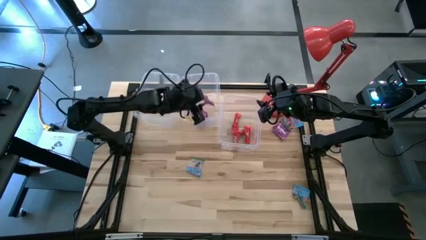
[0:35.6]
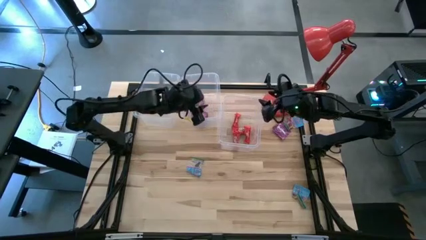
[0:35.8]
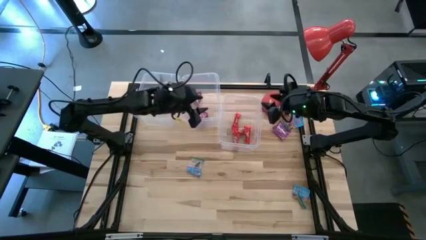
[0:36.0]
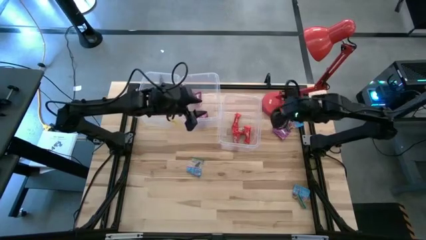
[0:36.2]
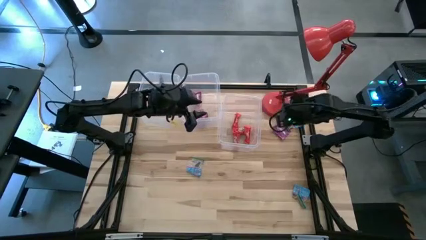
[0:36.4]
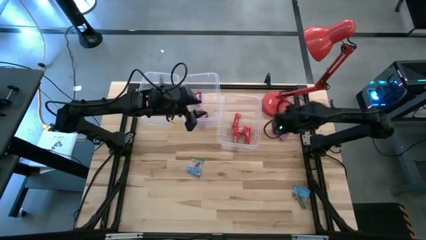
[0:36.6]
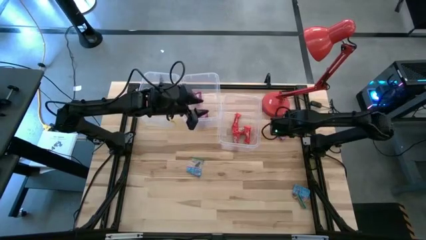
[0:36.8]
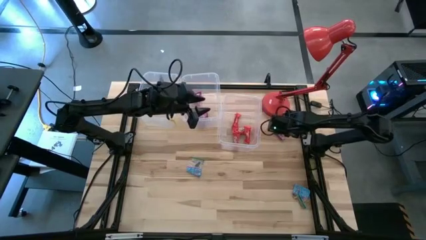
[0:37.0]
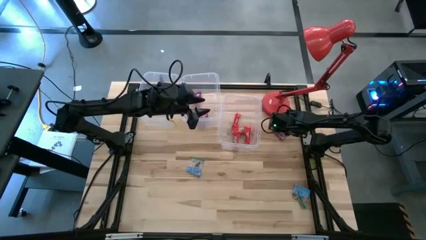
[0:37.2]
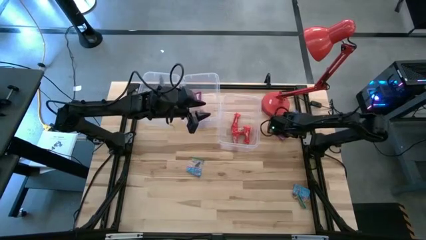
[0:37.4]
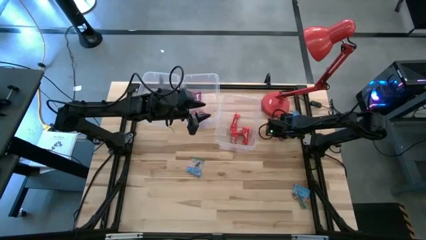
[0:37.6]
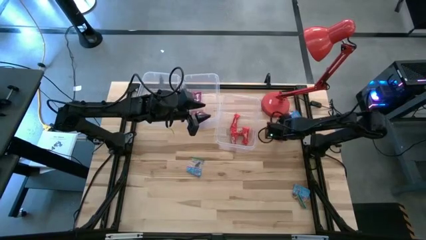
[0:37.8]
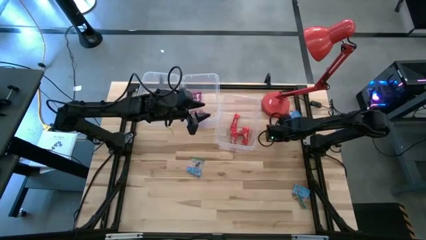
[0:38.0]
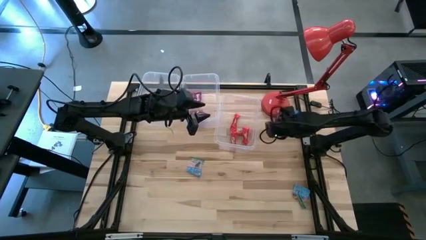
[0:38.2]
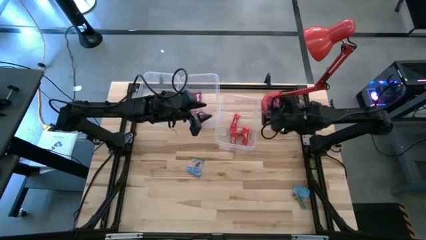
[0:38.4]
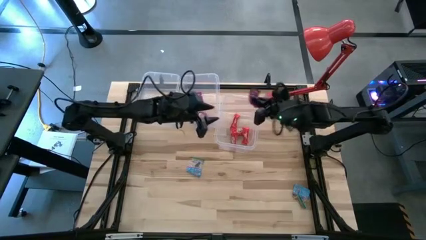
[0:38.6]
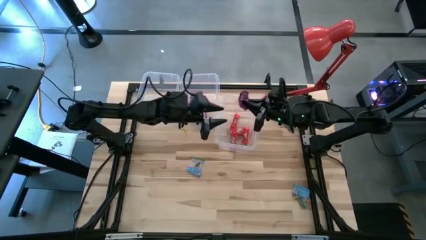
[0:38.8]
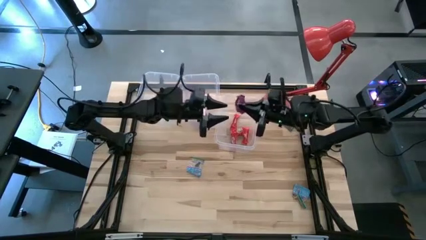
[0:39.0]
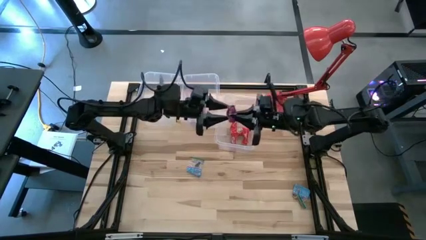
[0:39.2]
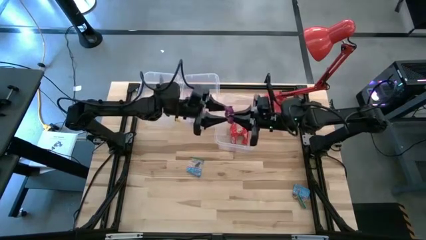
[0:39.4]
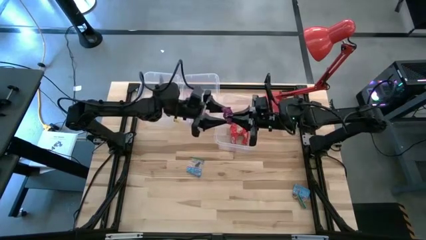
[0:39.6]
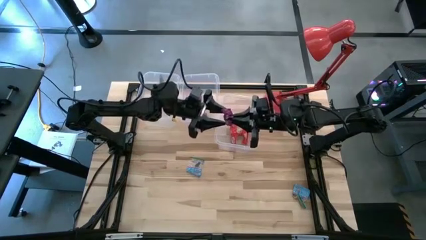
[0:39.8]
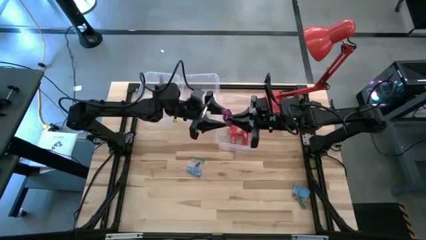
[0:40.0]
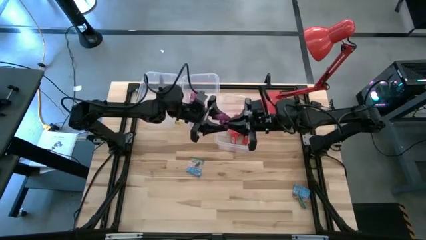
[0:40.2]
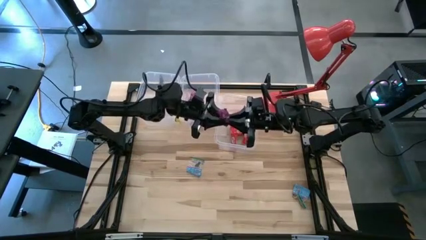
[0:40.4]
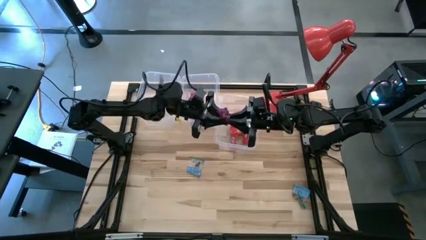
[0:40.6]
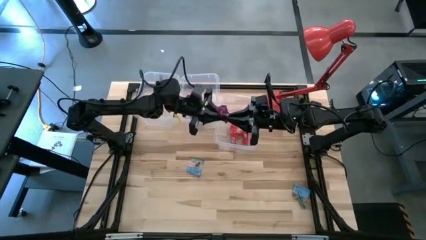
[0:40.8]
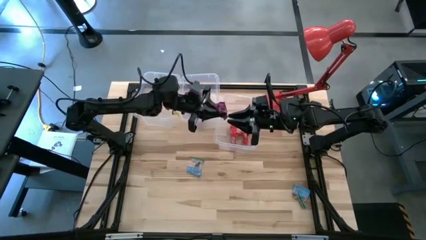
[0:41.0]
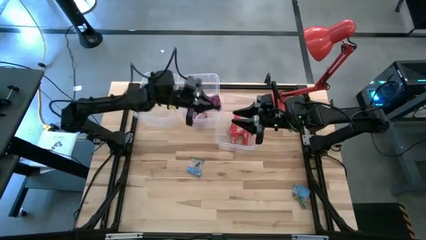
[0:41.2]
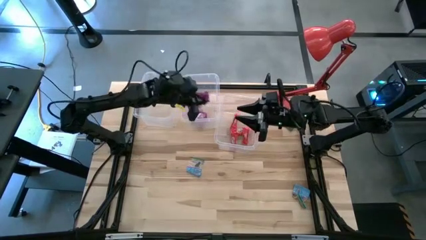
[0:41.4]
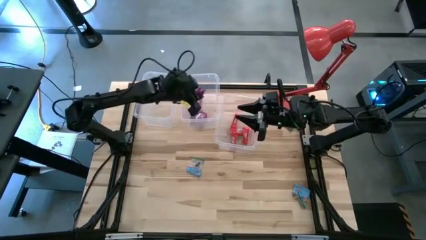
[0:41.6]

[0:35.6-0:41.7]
Task: Sort candy
Put the violet candy into the top center transparent bin

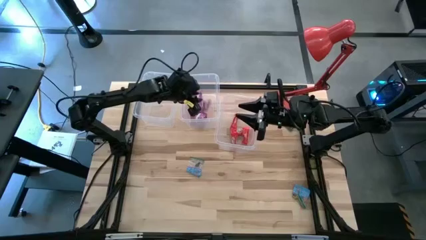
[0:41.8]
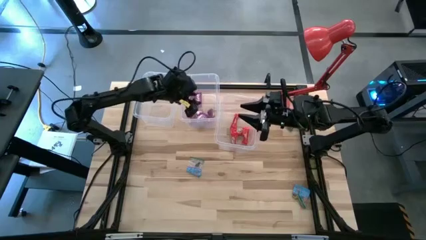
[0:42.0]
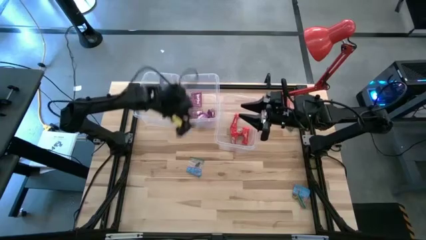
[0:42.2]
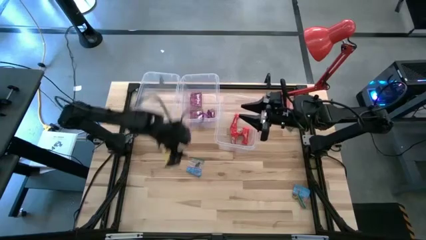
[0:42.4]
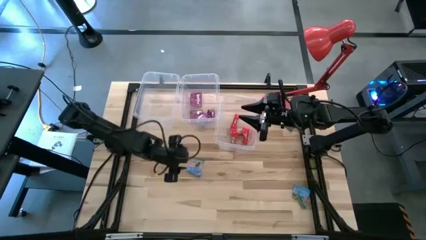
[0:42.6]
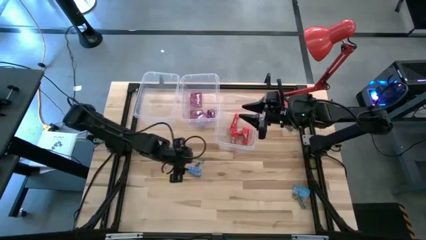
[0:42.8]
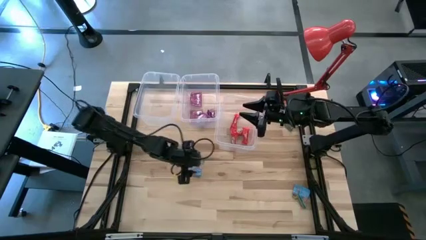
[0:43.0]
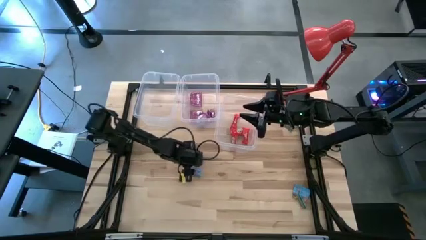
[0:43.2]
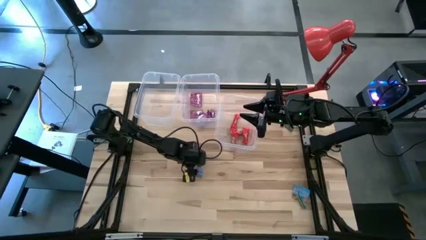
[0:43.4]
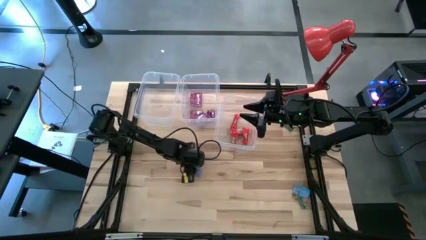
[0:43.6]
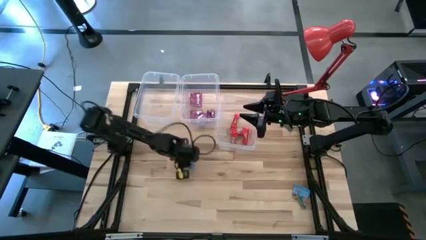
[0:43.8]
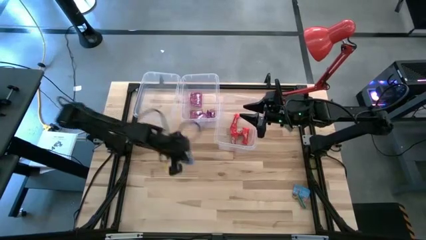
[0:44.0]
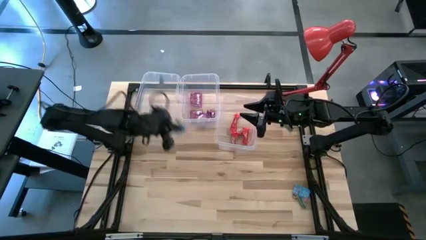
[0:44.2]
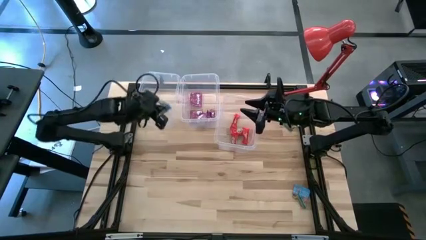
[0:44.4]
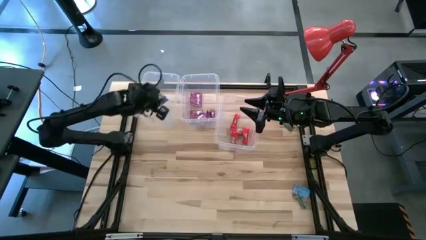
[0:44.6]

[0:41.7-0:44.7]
Put the middle left blue candy into the top left transparent bin

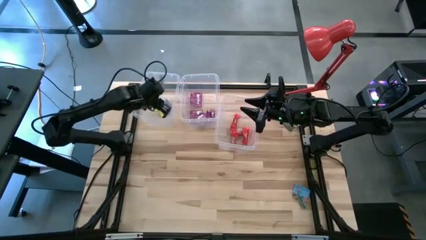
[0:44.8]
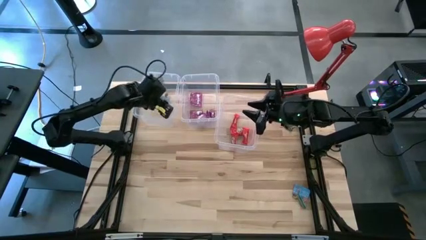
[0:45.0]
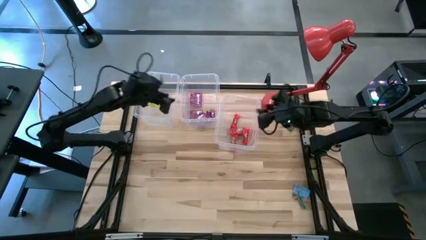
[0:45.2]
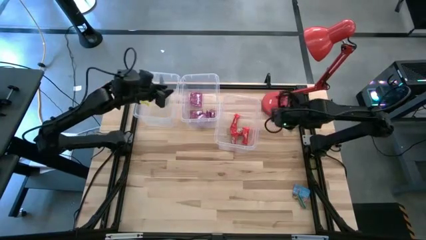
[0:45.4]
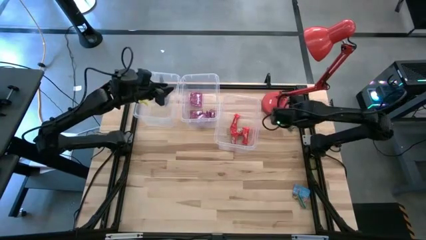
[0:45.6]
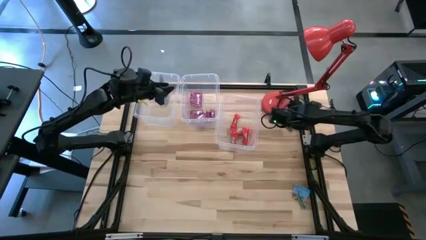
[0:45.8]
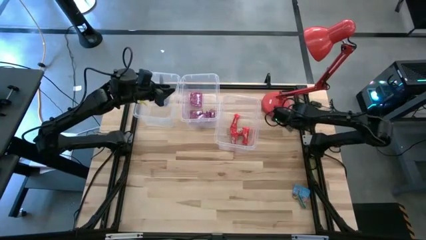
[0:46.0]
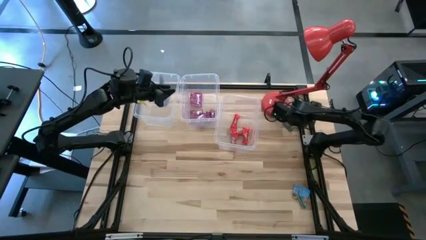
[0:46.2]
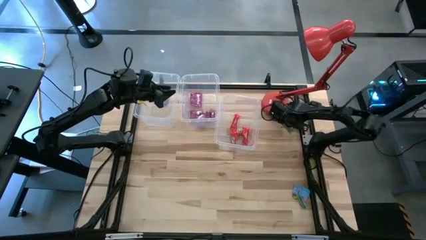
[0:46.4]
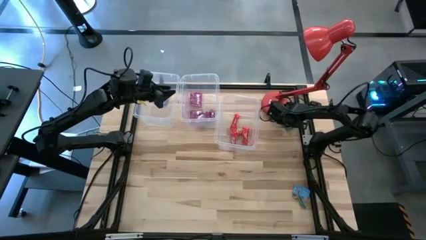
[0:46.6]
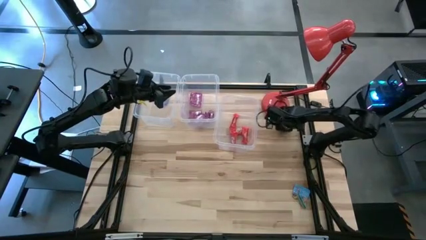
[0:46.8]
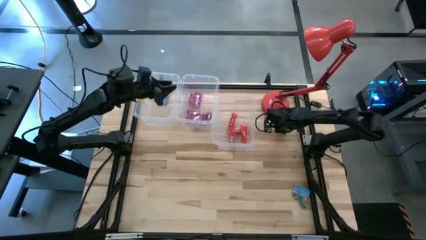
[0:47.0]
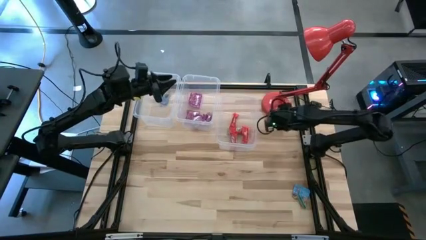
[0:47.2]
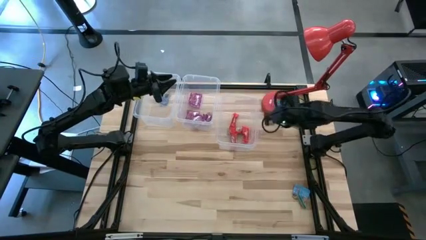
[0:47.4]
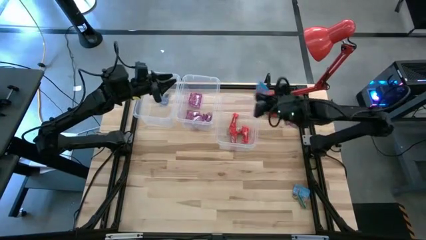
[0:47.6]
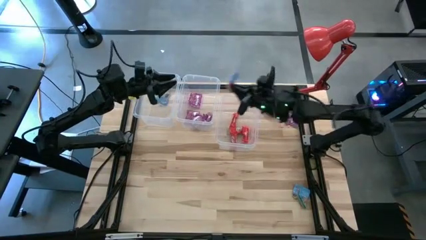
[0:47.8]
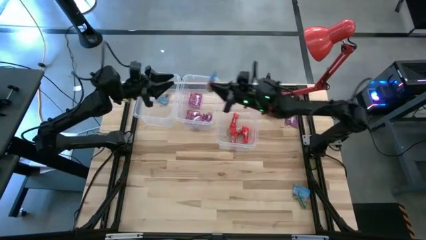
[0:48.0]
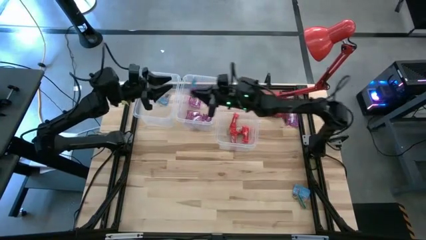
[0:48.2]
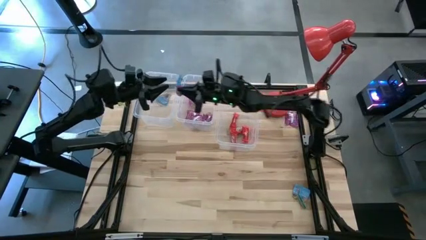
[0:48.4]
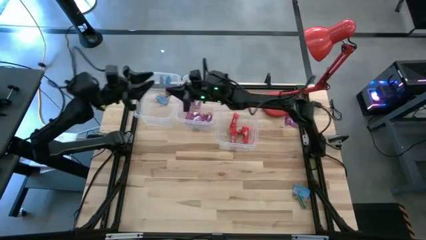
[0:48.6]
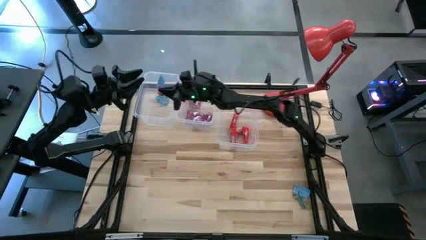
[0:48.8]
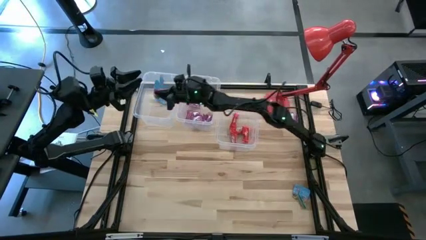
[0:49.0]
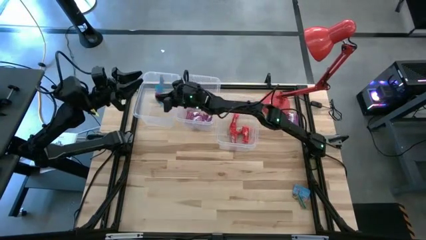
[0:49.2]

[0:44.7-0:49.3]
Put the top blue candy into the top left transparent bin

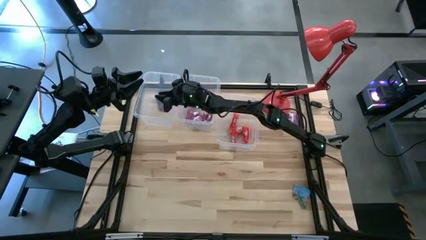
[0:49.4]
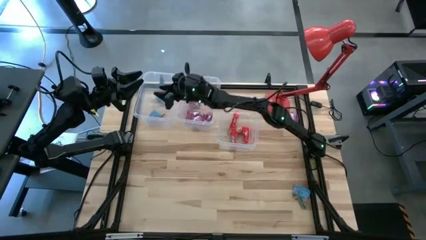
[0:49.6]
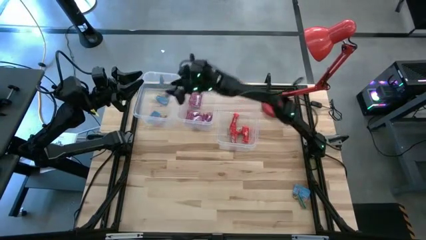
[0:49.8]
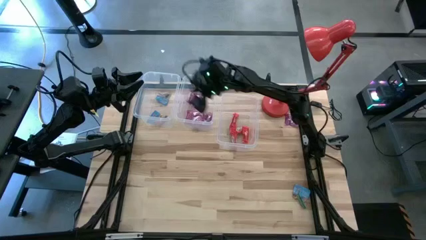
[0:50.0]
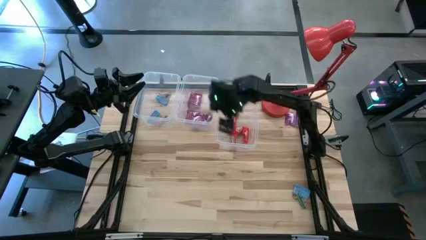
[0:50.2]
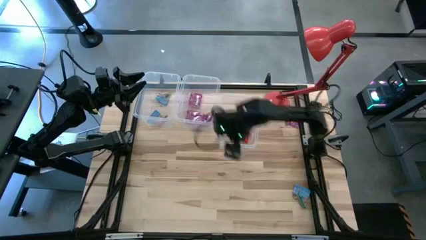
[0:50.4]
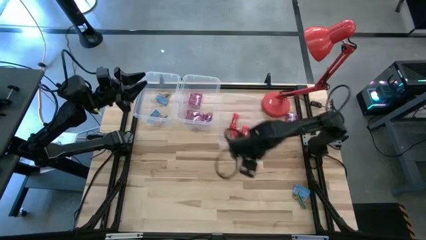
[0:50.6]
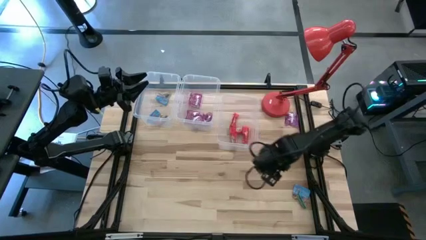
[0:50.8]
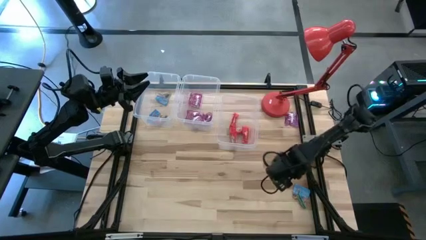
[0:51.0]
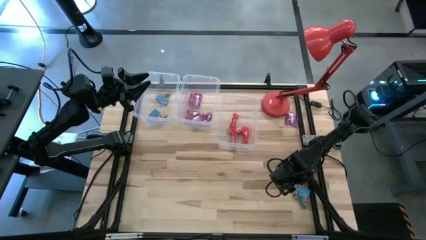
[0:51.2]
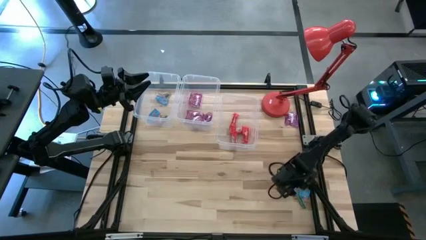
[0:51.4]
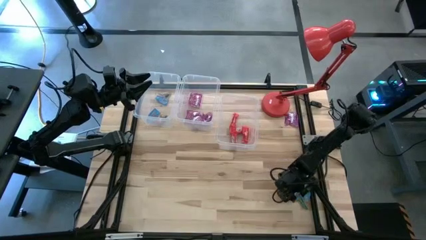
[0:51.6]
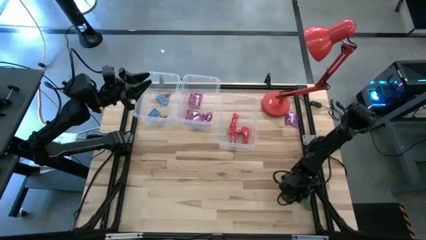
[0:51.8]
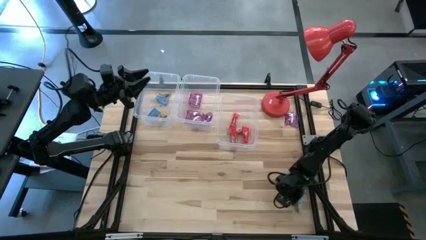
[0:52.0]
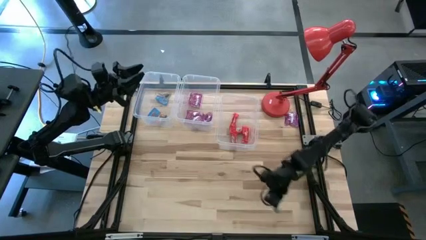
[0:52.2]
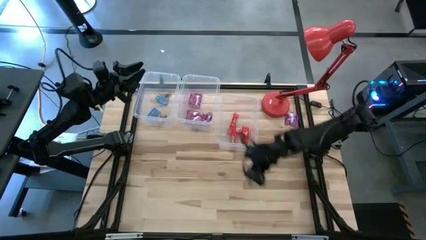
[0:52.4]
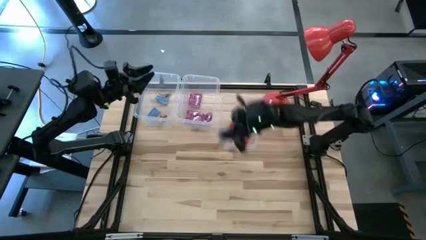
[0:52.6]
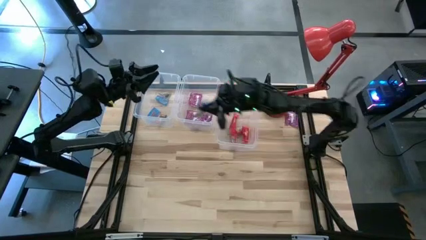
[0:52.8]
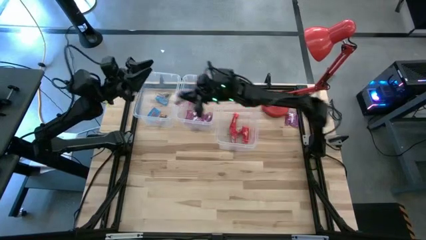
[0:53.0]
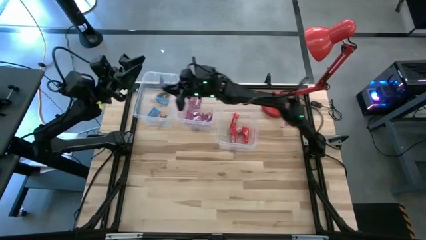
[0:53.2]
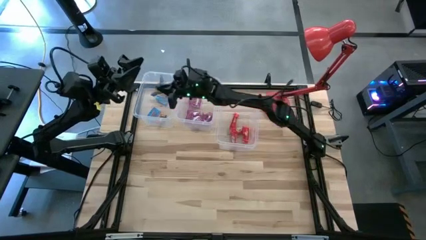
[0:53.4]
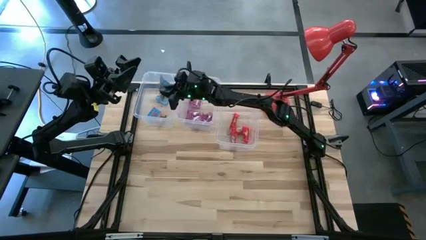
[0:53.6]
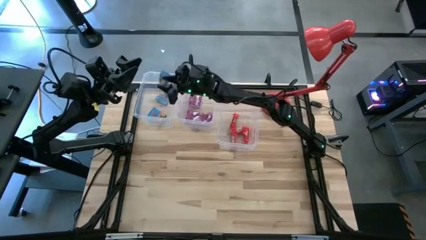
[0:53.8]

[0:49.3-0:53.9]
Put the blue candy into the top left transparent bin
